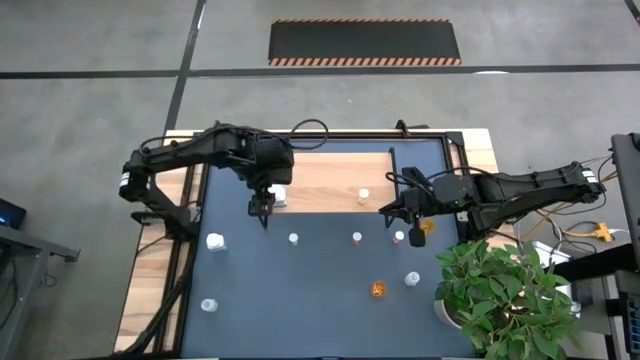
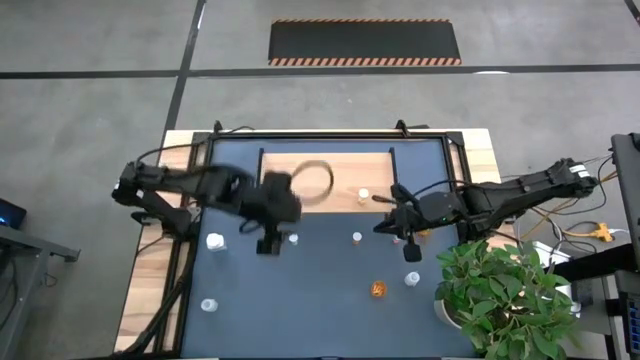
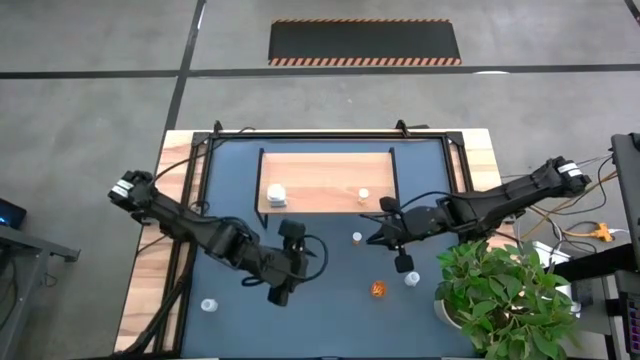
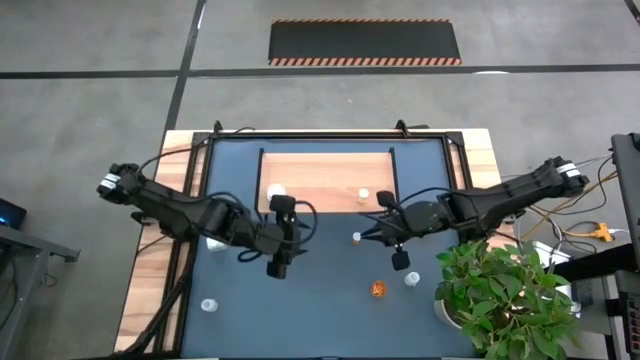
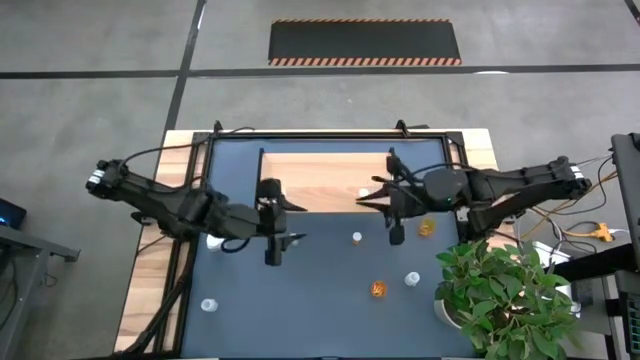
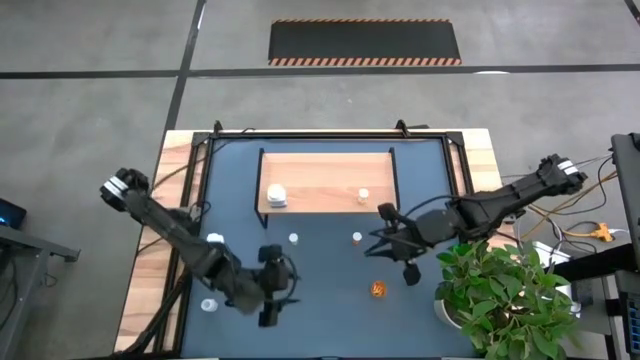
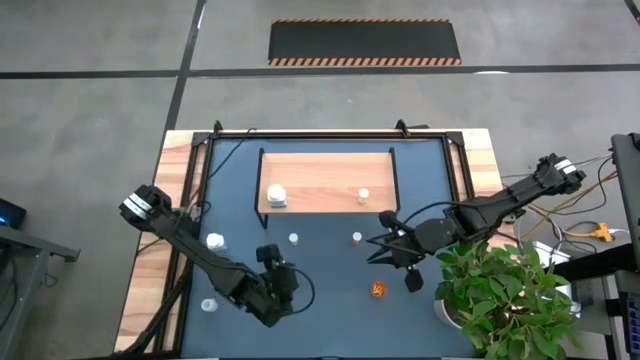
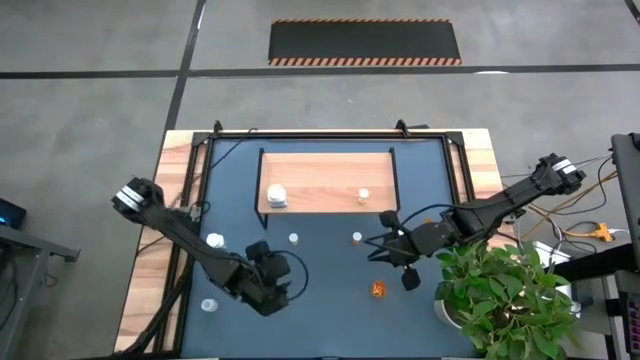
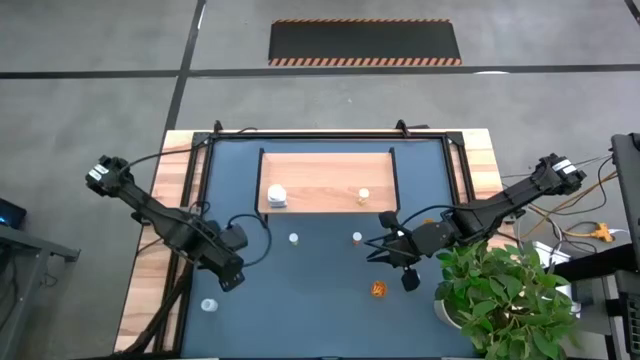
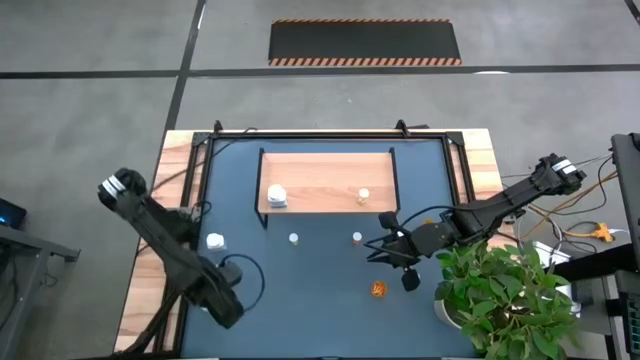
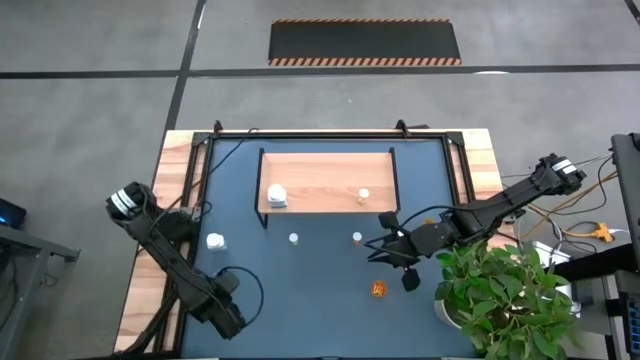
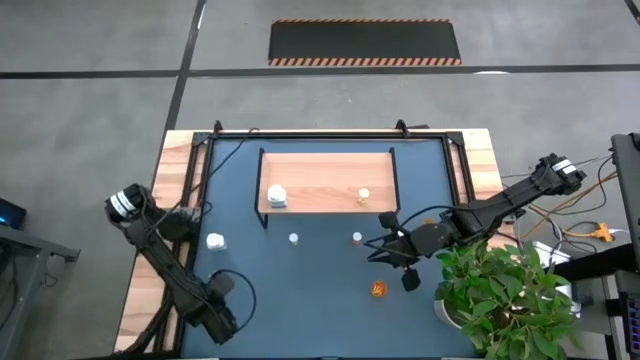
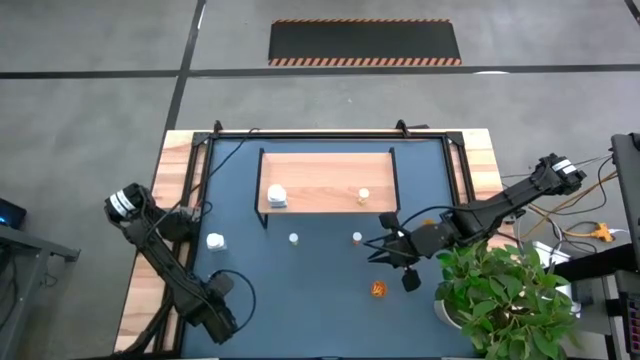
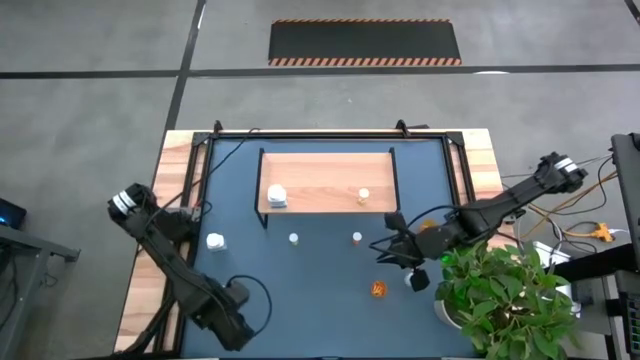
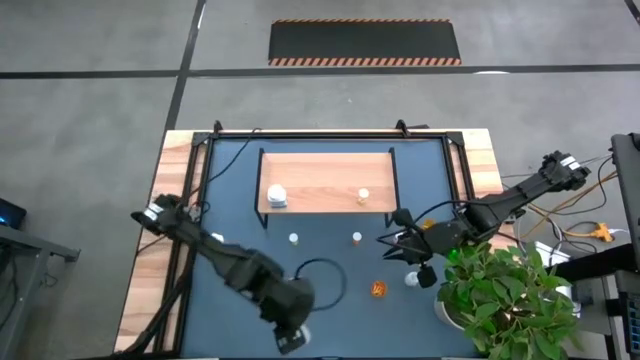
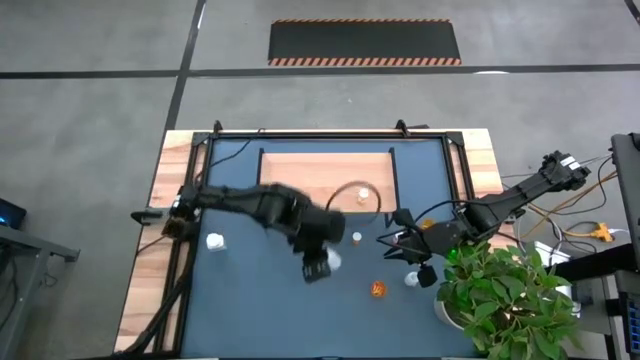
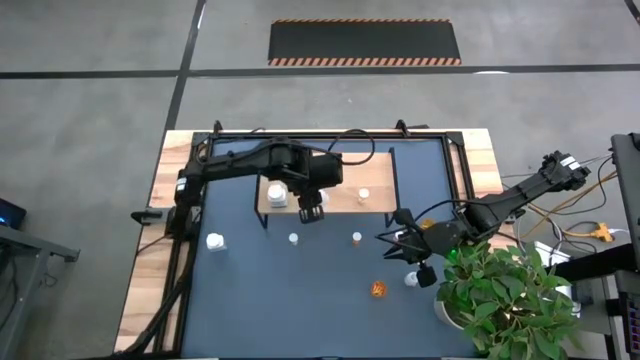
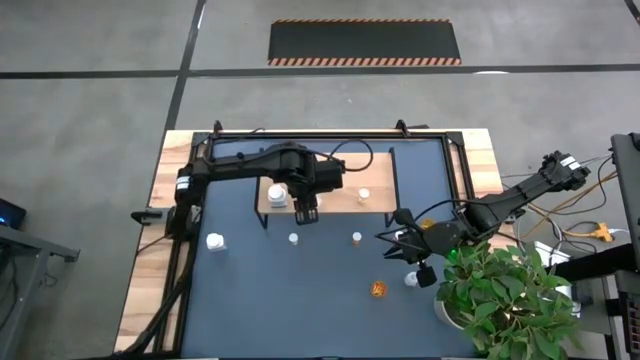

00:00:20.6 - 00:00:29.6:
Task: Pick and place medicine bottles onto shelf by color
Put the left transparent bottle on the shelf

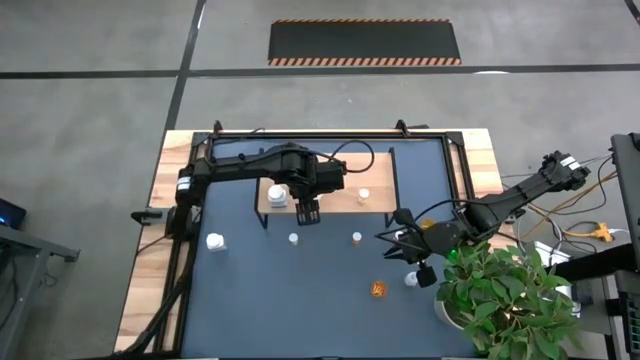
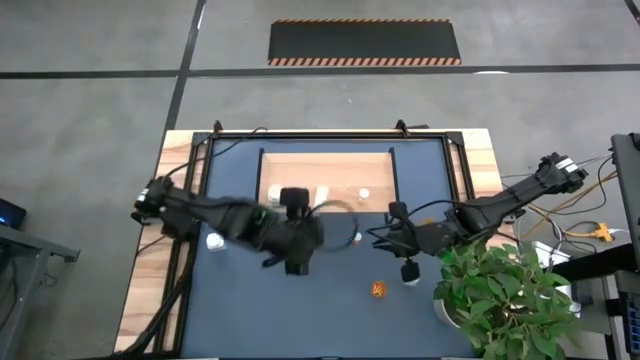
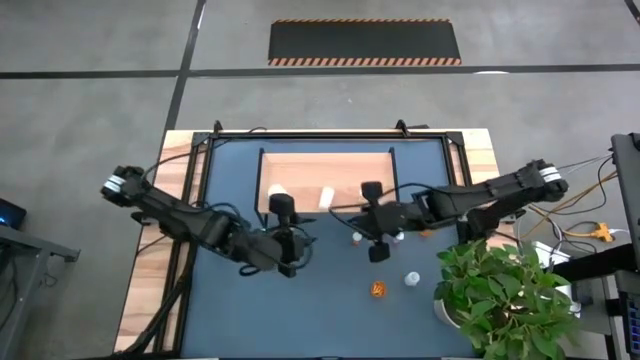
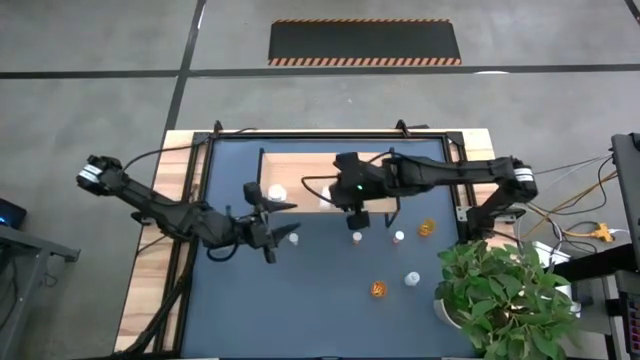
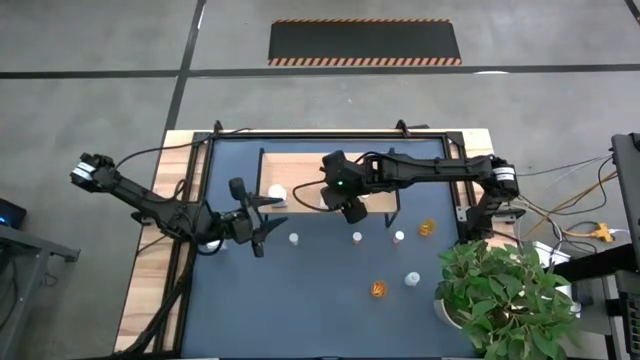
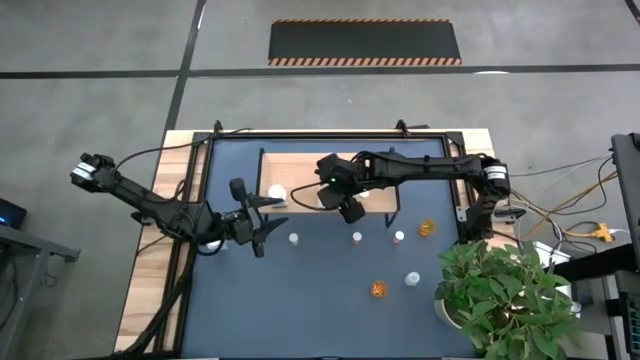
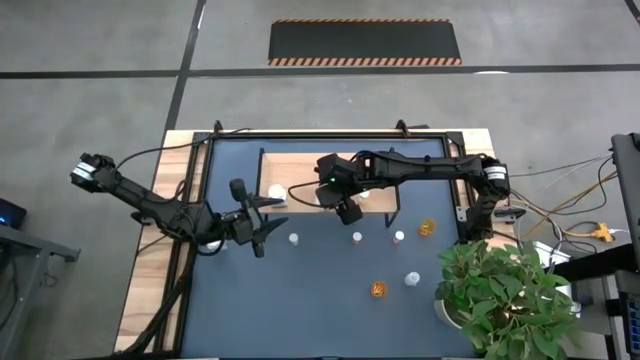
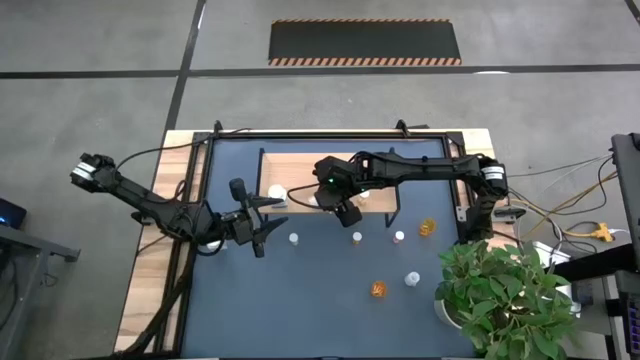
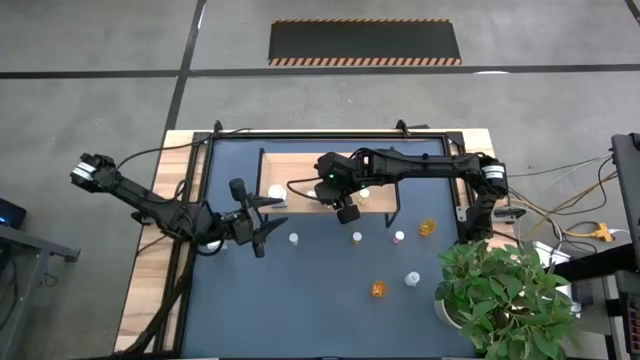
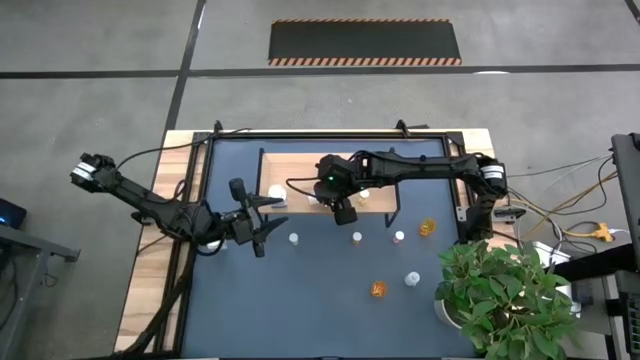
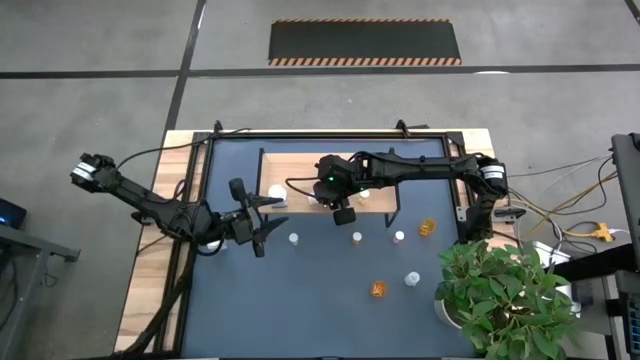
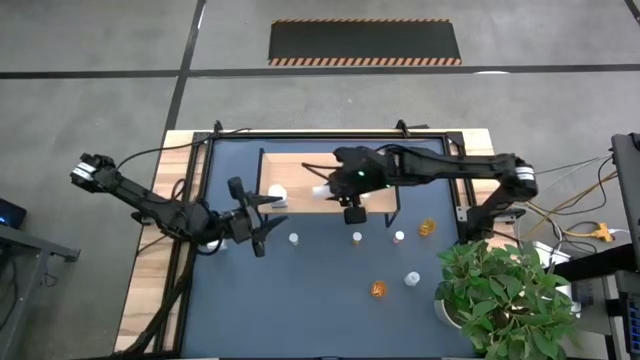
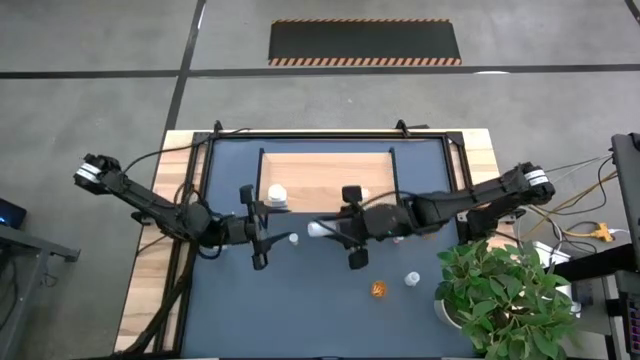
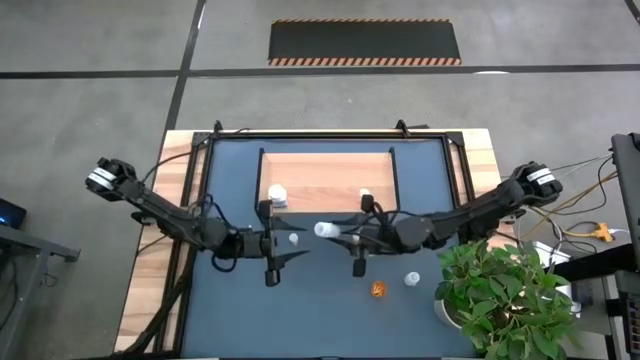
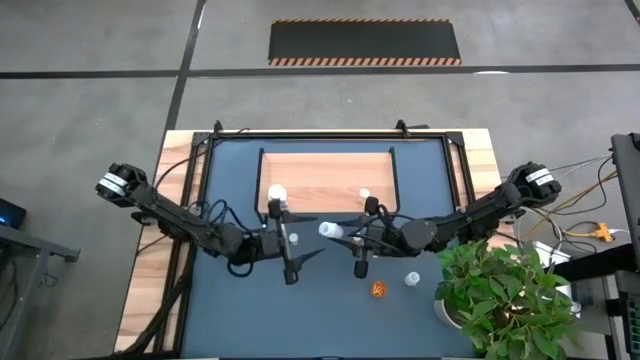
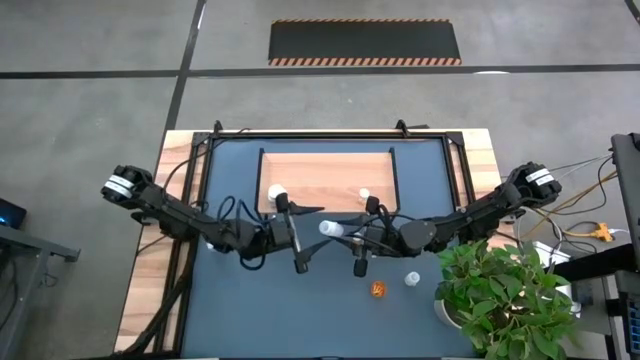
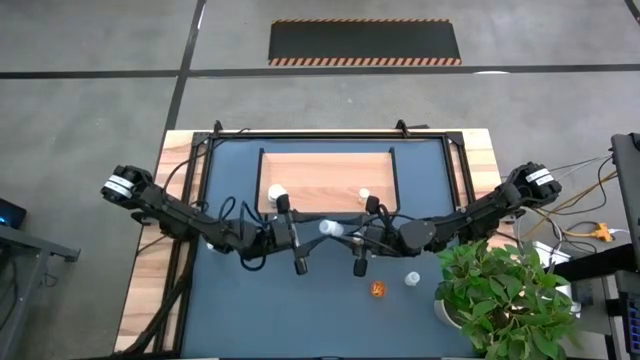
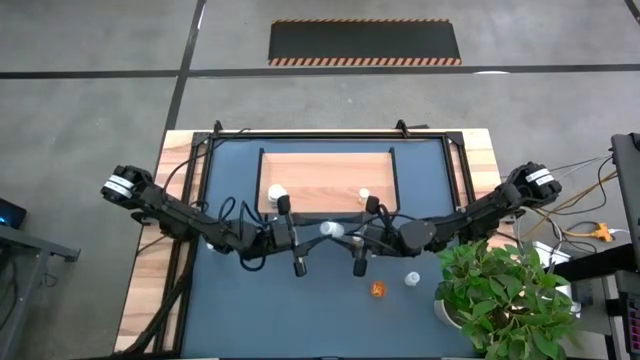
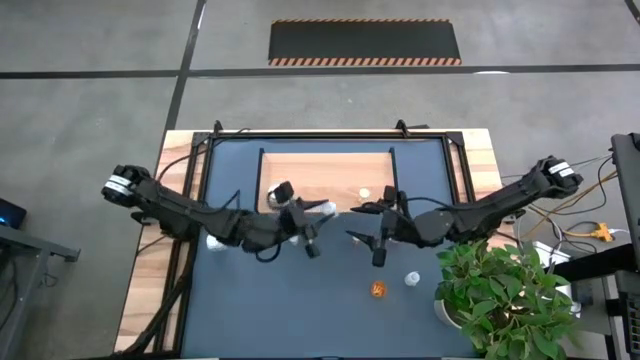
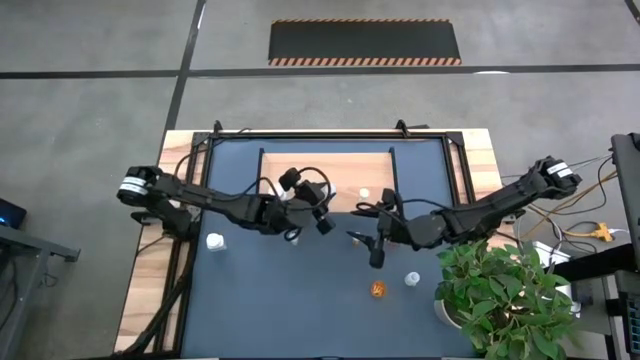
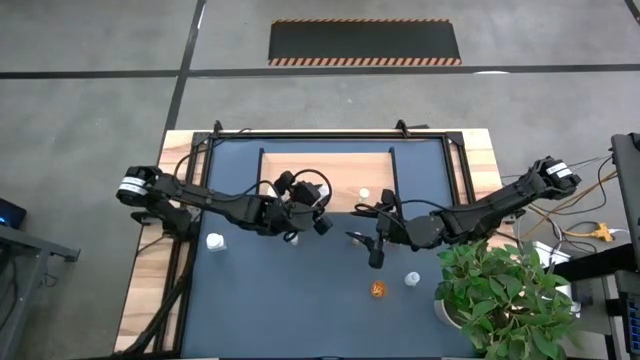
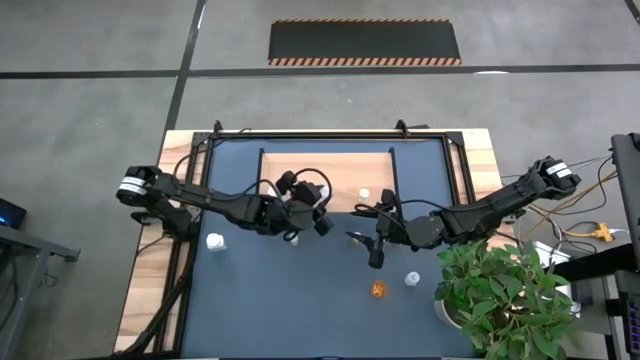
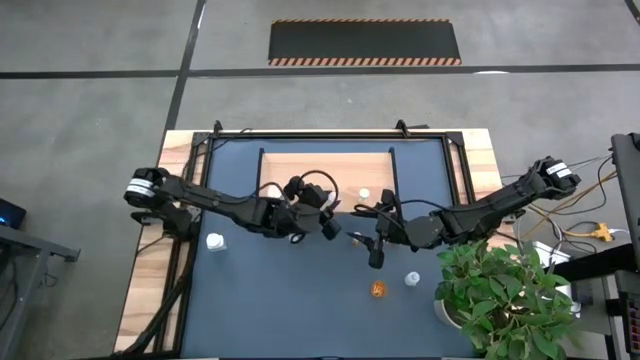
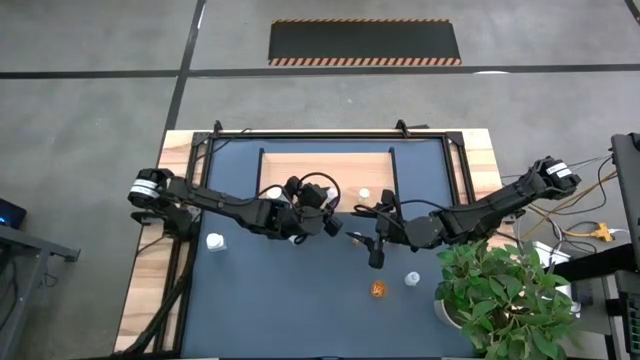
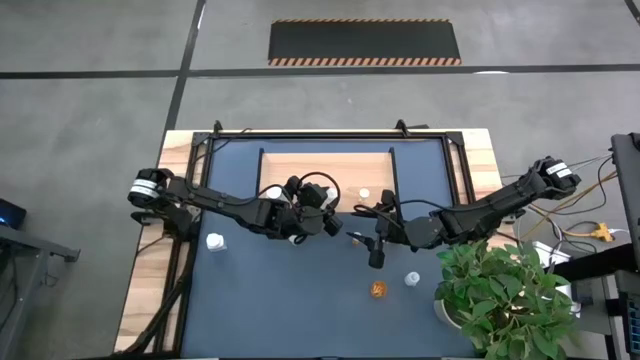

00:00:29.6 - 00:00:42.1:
Put the top transparent bottle on the shelf
